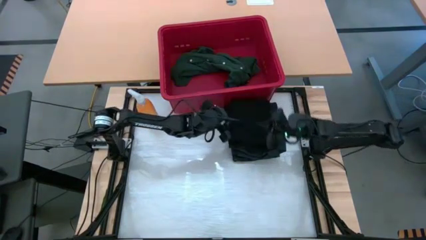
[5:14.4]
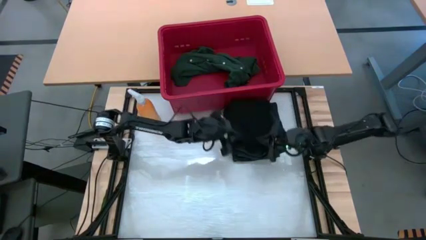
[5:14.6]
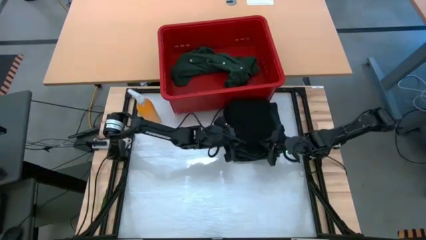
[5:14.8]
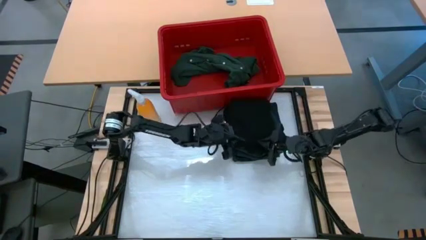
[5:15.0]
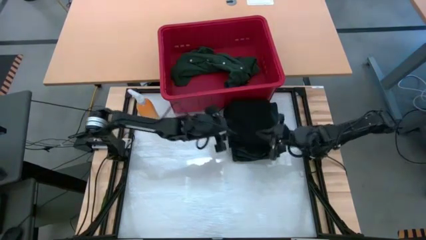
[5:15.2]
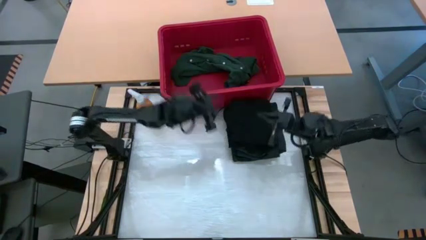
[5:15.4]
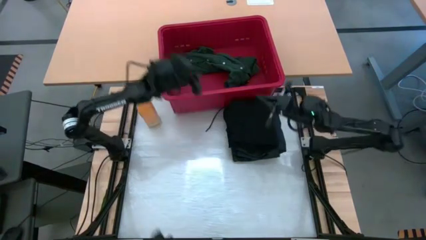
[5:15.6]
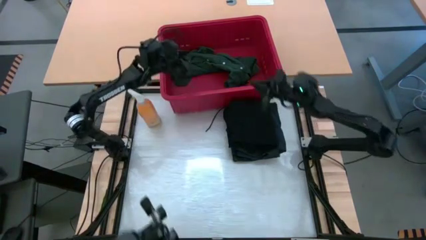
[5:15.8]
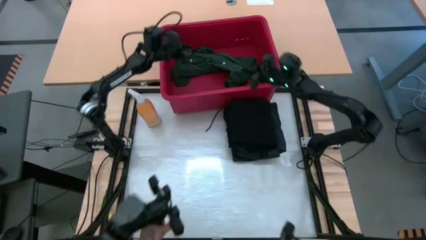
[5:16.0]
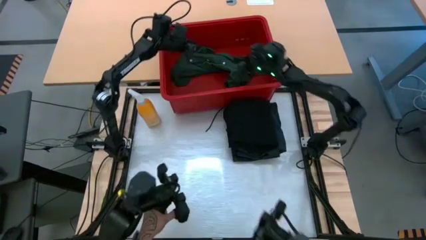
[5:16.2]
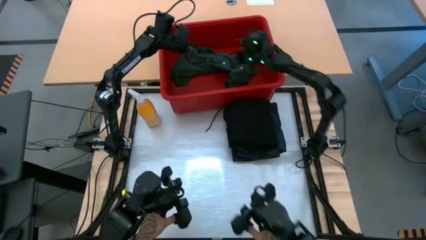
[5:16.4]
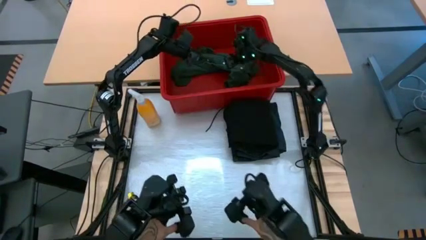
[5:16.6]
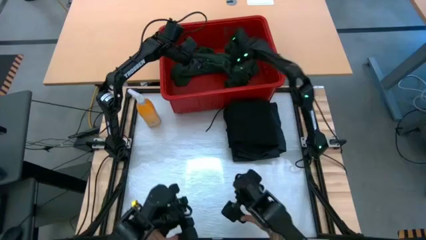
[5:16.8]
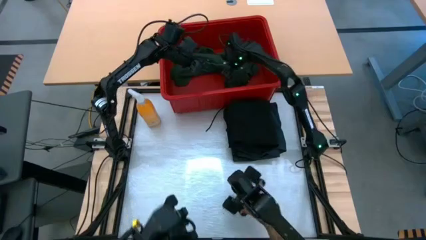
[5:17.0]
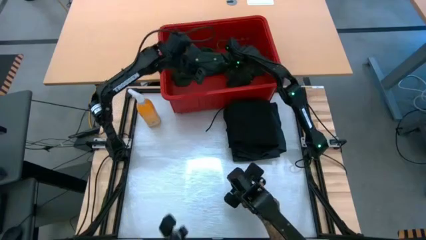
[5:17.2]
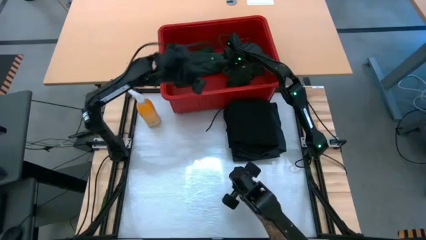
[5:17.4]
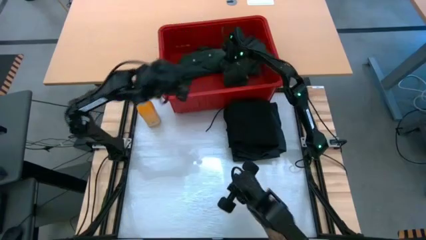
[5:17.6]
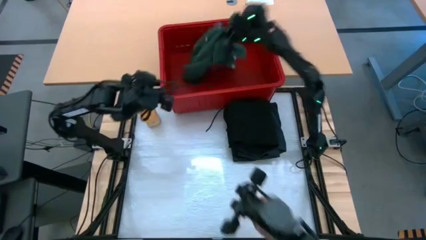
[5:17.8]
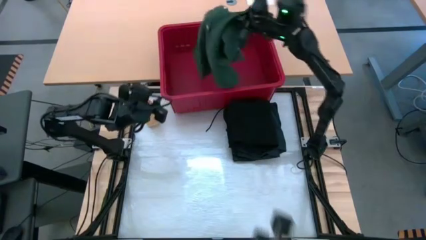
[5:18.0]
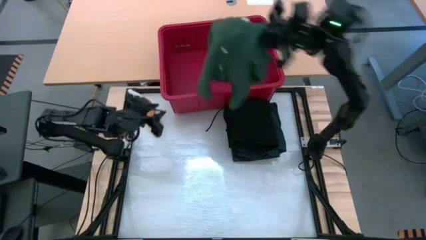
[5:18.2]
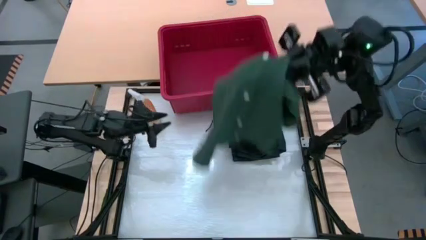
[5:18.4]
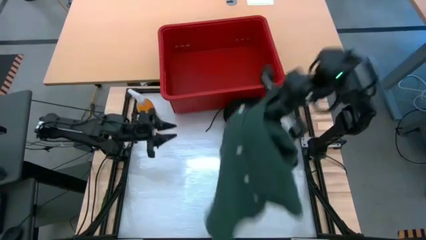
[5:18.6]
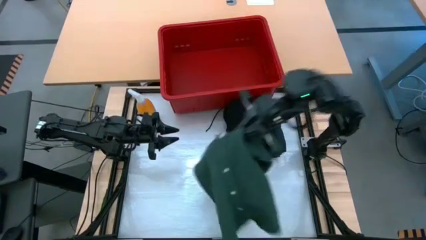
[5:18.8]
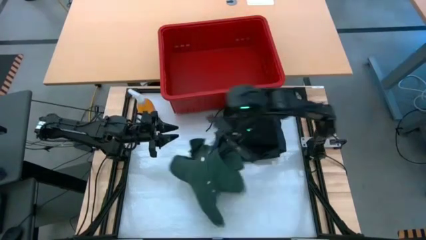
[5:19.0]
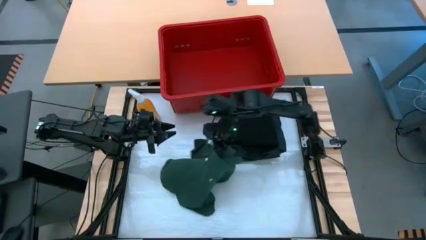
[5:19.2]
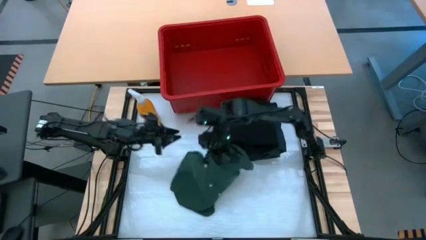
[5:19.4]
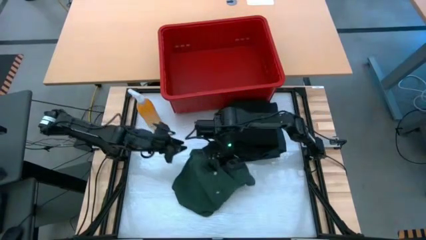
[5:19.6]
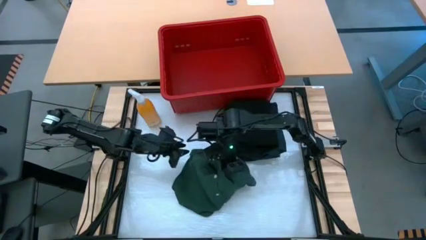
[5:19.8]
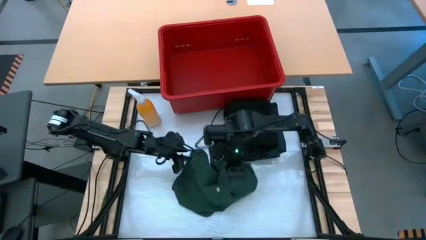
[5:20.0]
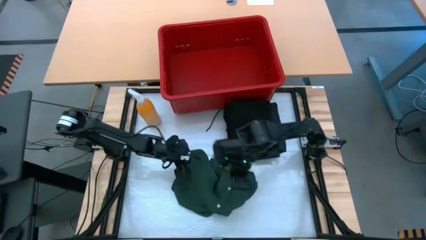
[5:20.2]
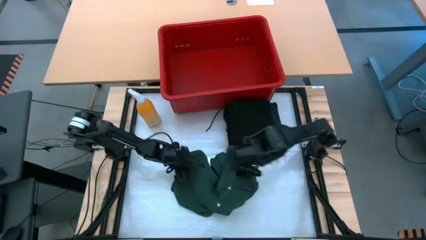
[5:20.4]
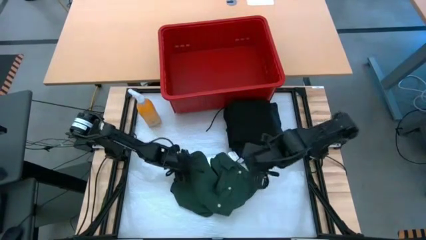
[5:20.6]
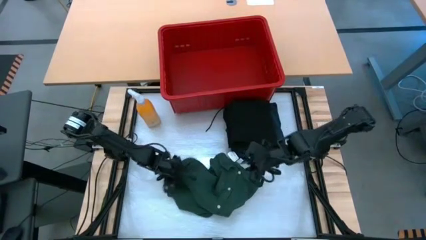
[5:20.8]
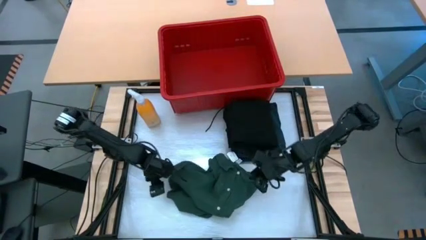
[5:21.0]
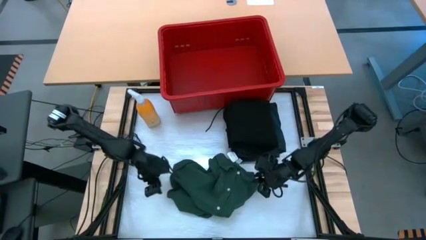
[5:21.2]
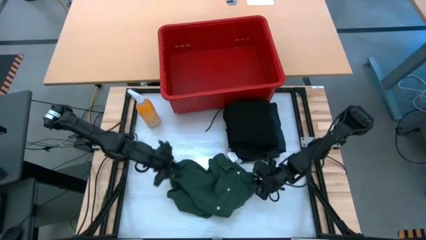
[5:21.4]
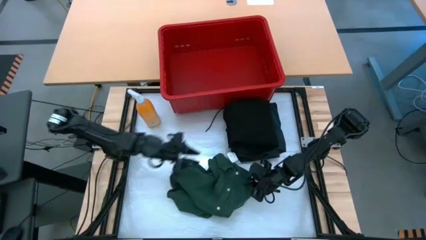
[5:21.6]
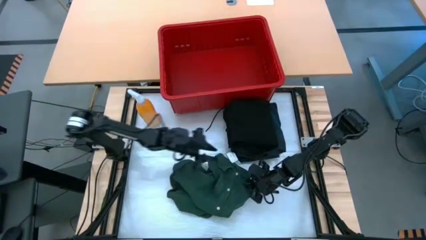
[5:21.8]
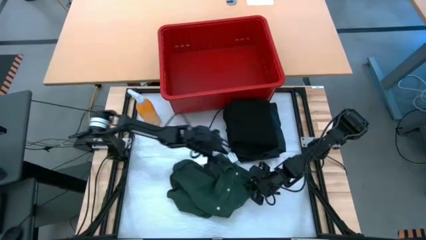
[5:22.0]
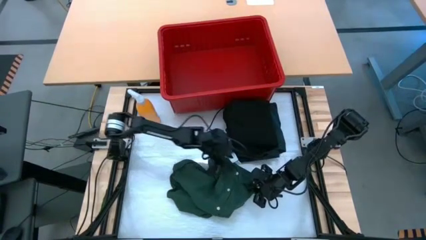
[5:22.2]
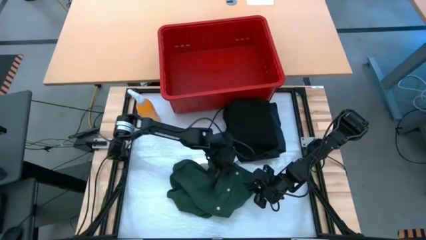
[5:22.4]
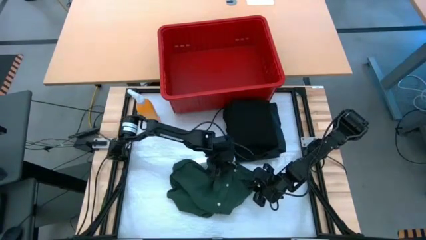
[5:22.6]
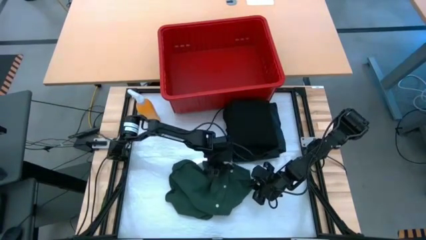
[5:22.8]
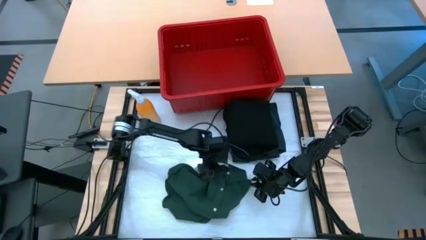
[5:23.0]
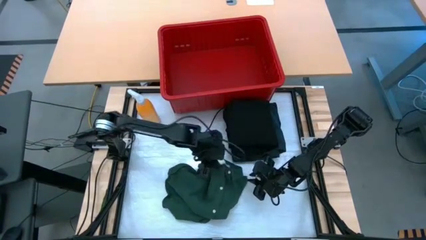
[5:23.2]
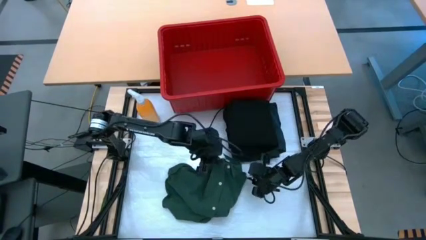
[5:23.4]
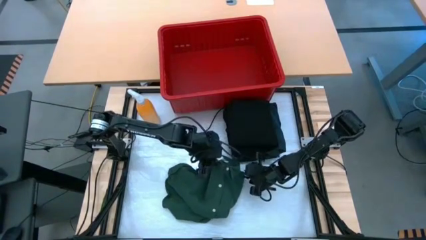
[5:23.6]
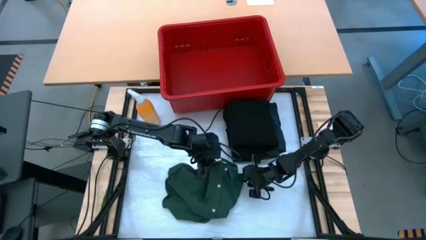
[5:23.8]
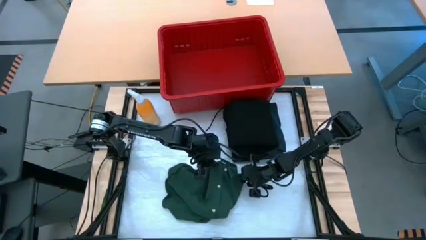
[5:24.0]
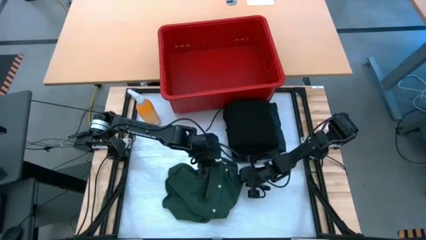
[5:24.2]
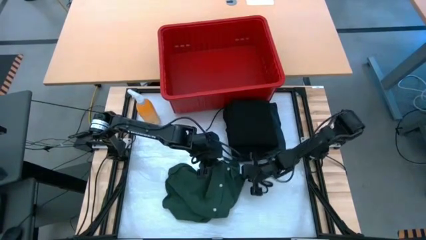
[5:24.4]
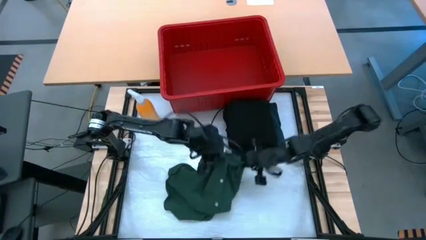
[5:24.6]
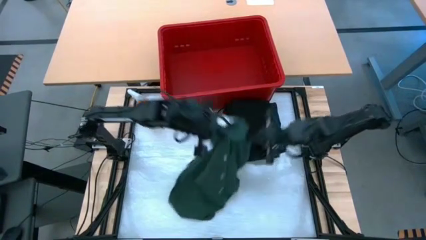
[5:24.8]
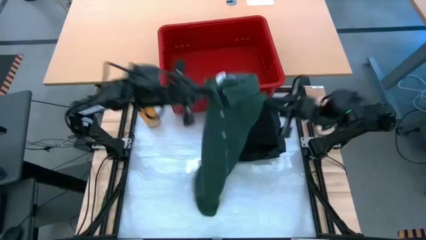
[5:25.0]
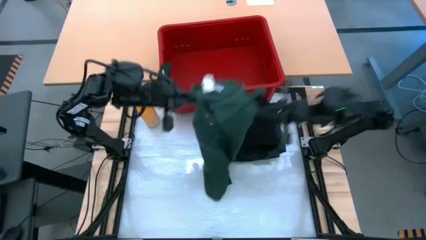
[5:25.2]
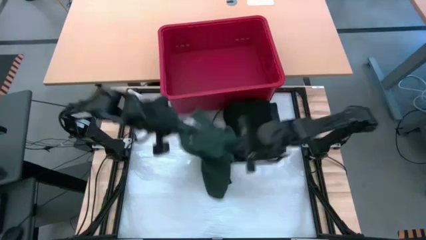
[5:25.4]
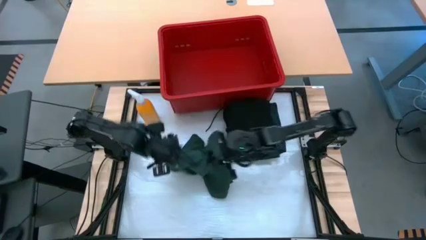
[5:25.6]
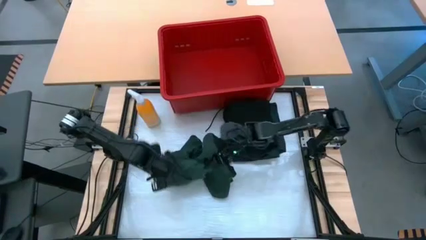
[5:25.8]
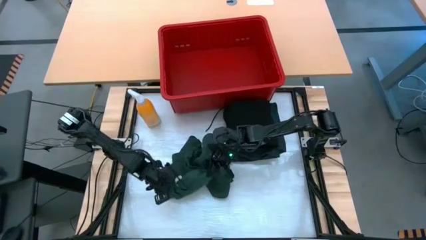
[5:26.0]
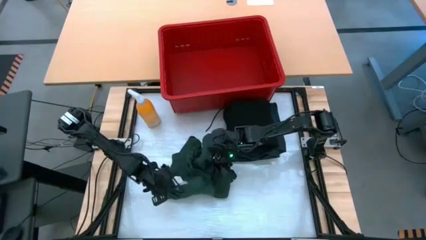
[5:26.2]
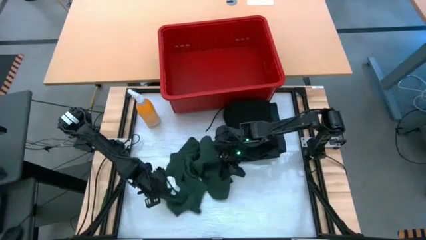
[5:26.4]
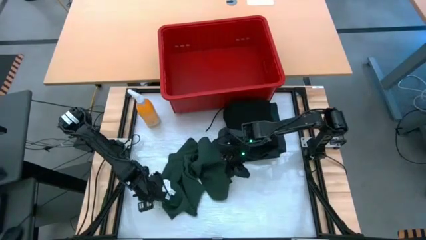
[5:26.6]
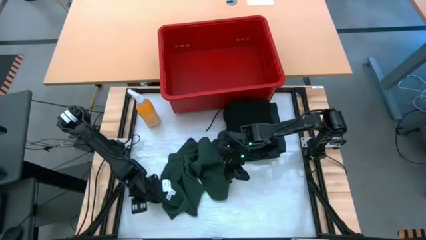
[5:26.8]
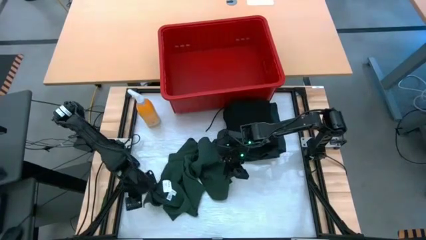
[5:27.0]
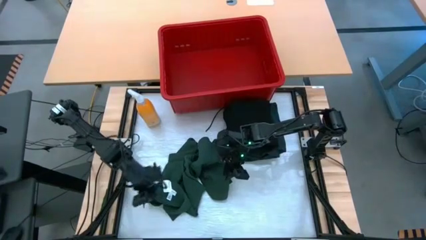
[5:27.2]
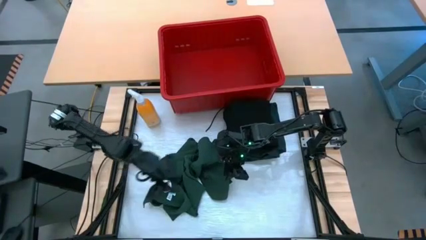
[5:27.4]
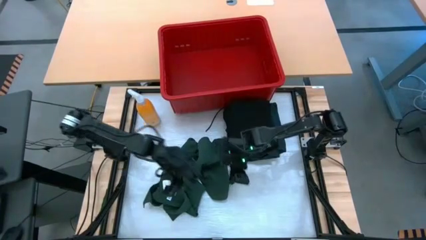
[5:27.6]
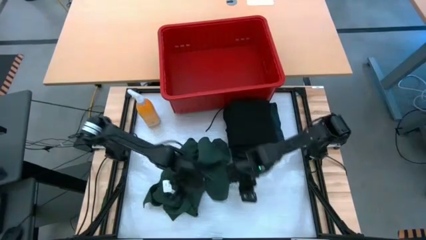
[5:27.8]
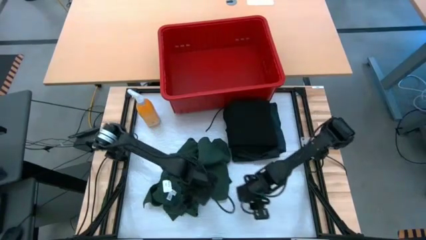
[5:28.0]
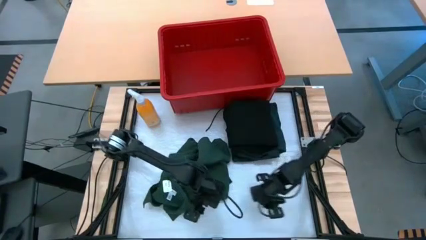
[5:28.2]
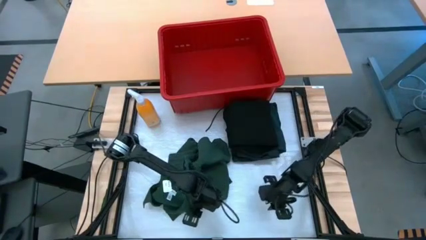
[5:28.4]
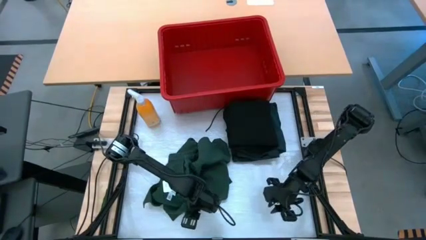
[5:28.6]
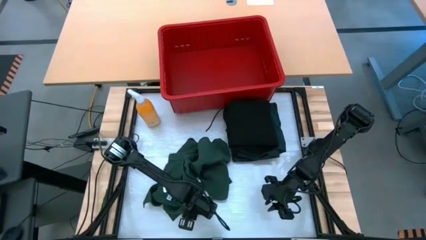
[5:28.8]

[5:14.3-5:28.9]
Task: Fold Laundry from Bin
Fold the green polo shirt
